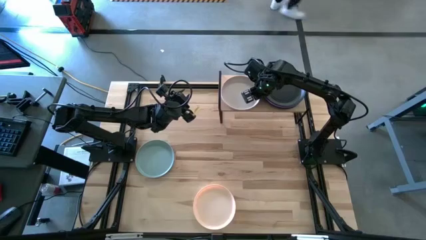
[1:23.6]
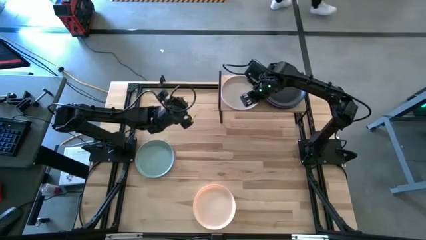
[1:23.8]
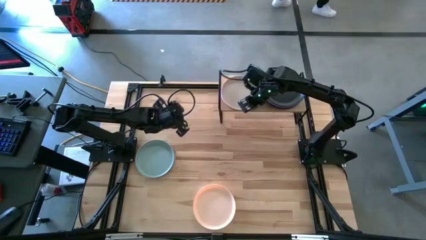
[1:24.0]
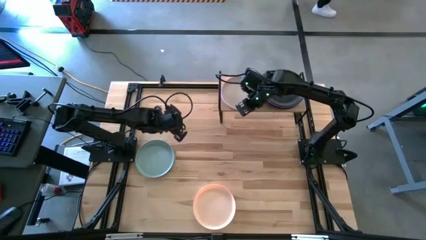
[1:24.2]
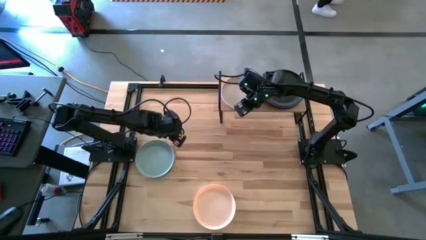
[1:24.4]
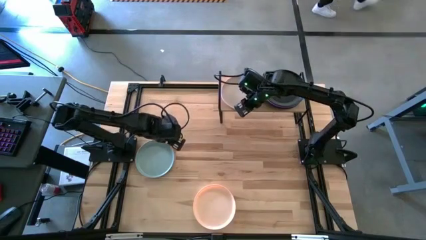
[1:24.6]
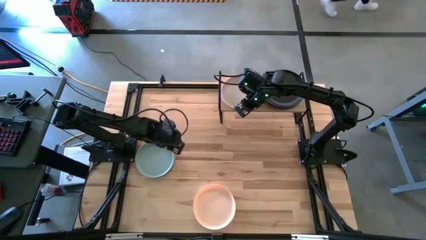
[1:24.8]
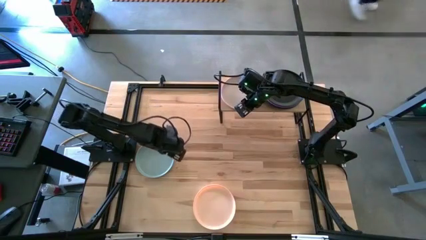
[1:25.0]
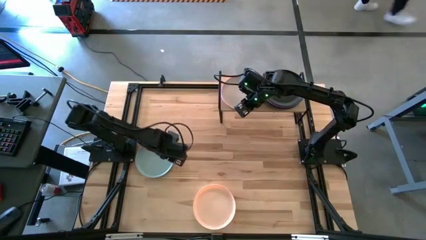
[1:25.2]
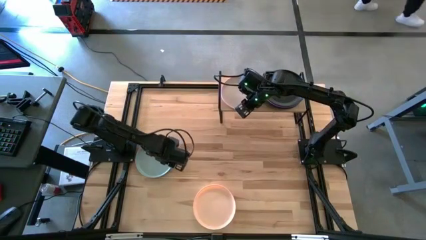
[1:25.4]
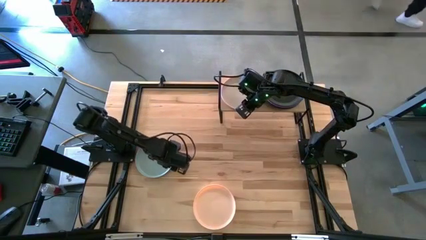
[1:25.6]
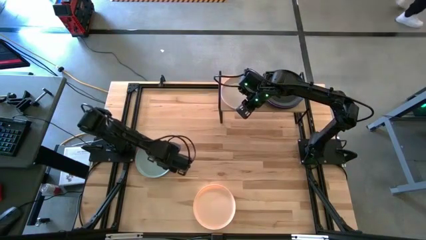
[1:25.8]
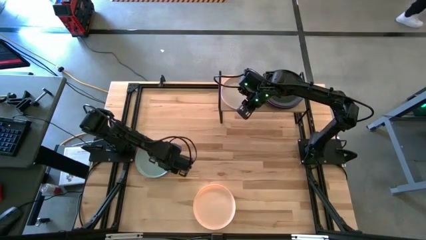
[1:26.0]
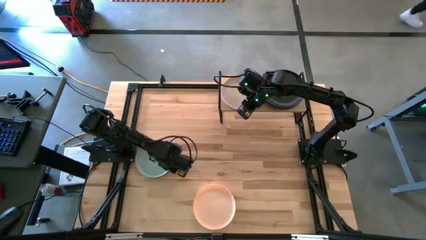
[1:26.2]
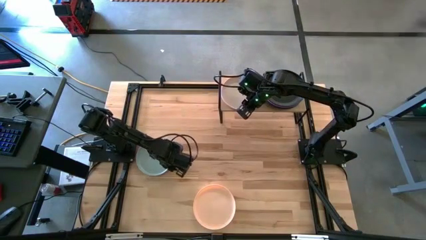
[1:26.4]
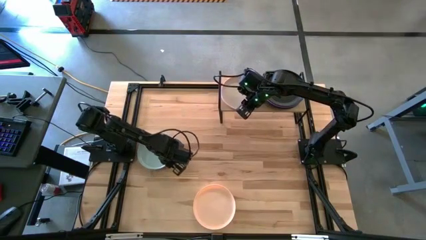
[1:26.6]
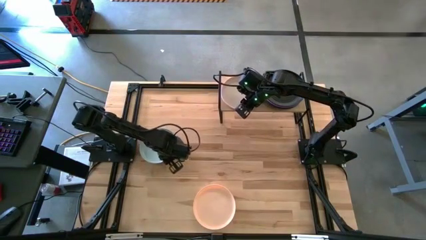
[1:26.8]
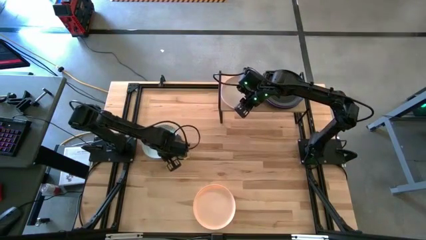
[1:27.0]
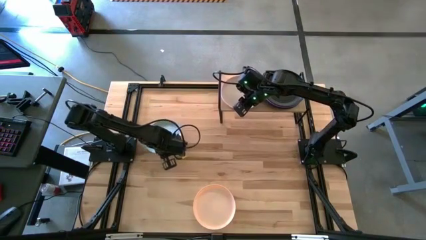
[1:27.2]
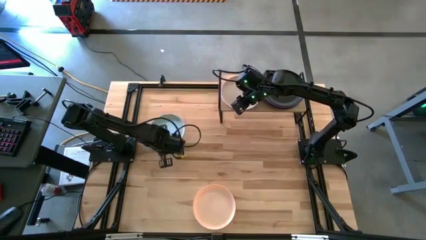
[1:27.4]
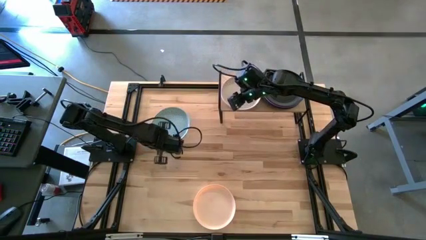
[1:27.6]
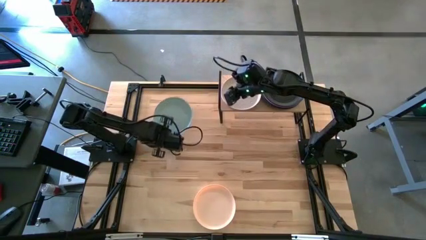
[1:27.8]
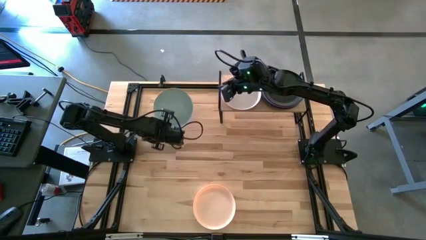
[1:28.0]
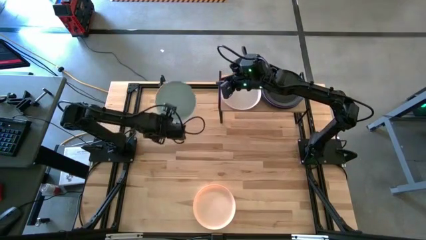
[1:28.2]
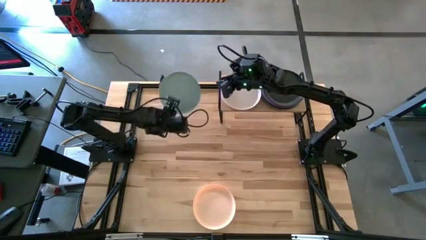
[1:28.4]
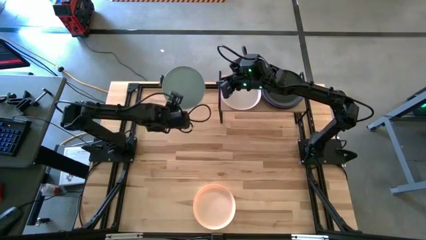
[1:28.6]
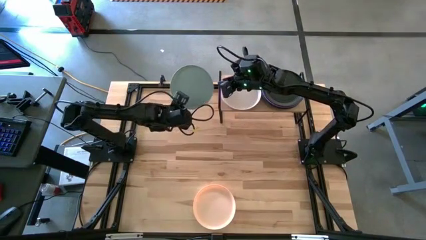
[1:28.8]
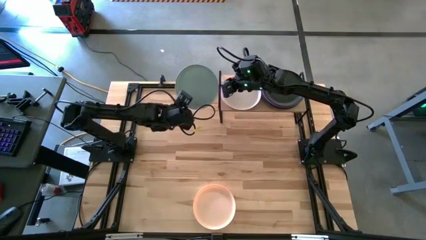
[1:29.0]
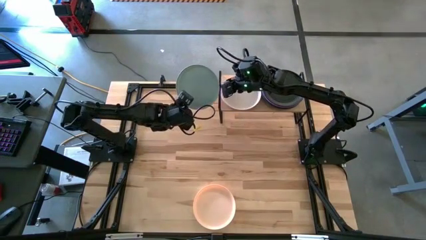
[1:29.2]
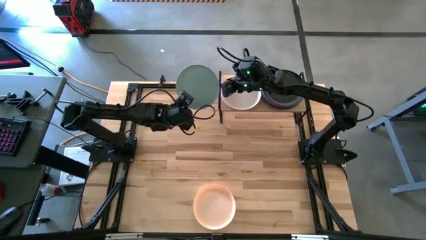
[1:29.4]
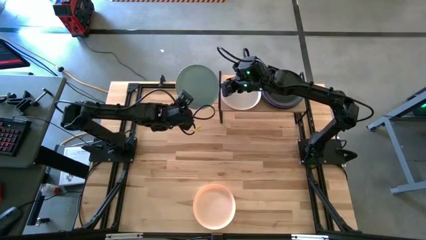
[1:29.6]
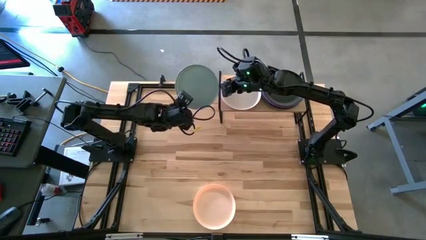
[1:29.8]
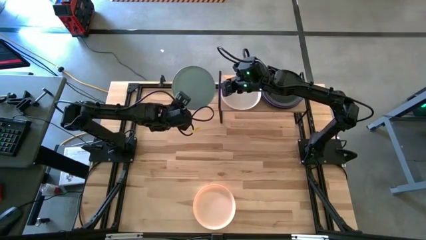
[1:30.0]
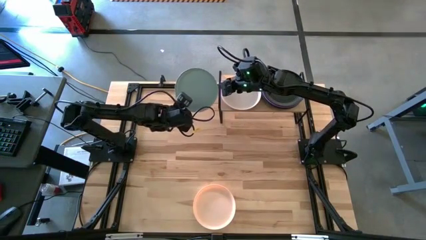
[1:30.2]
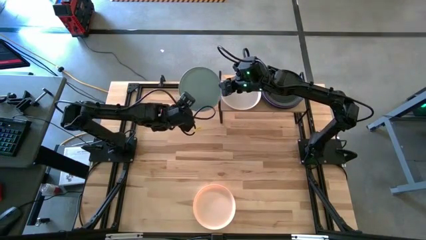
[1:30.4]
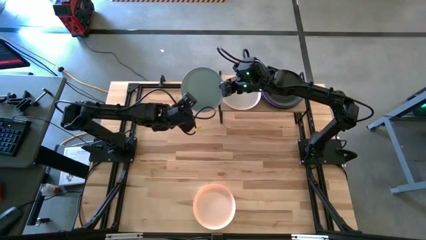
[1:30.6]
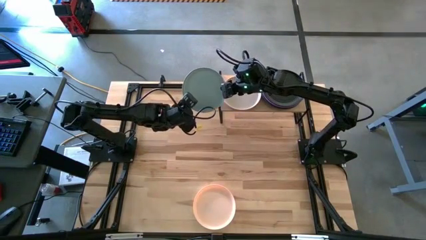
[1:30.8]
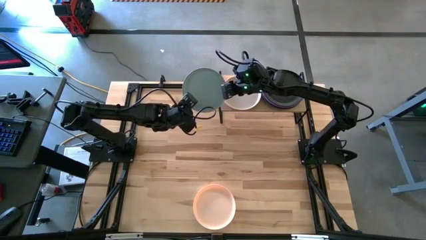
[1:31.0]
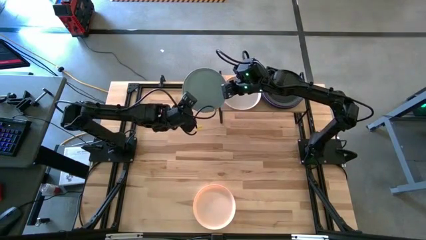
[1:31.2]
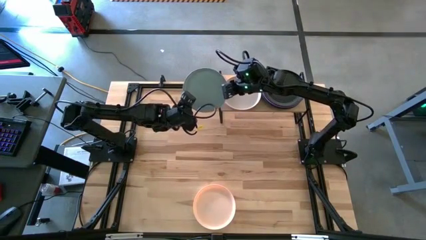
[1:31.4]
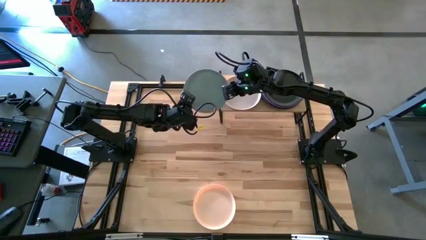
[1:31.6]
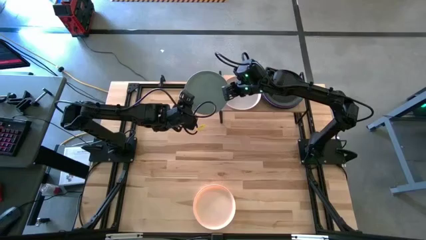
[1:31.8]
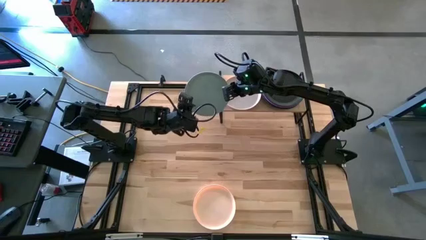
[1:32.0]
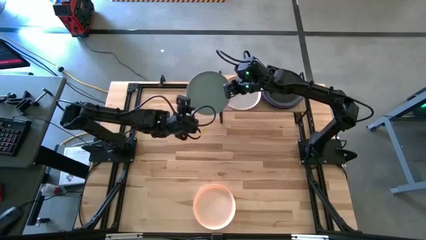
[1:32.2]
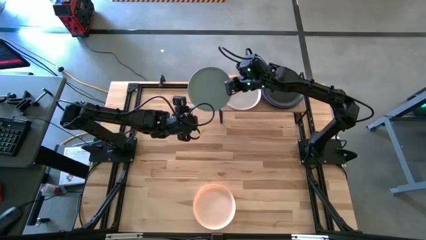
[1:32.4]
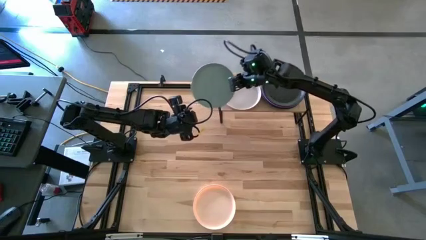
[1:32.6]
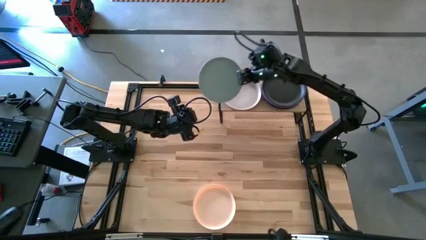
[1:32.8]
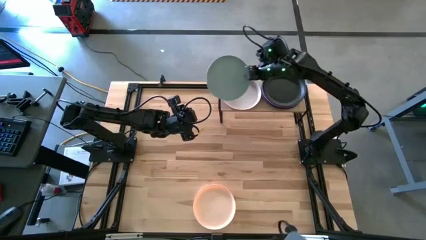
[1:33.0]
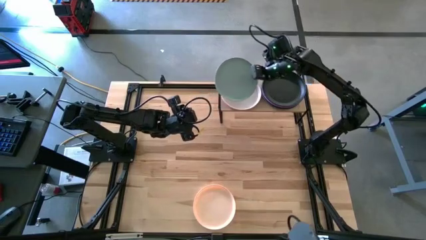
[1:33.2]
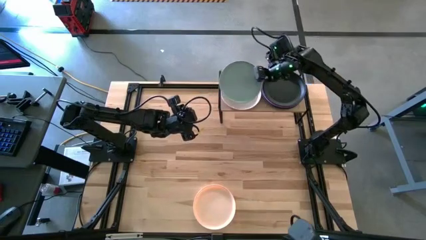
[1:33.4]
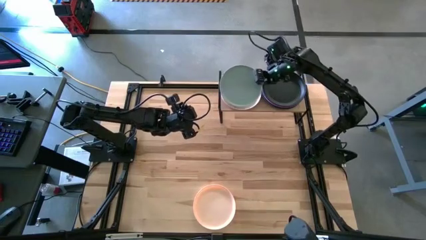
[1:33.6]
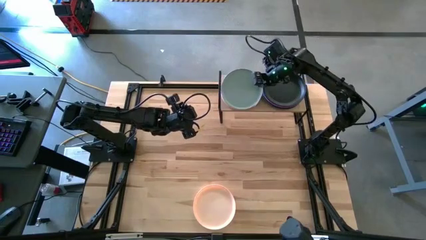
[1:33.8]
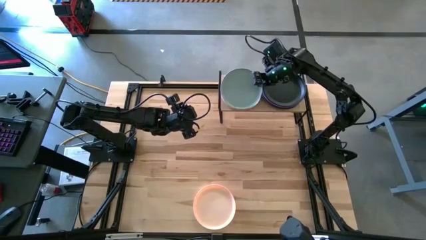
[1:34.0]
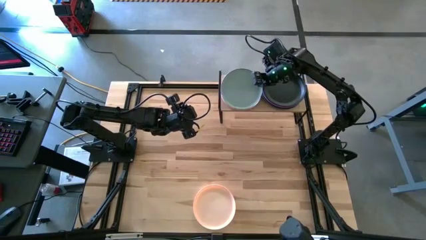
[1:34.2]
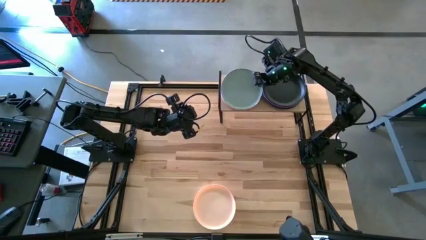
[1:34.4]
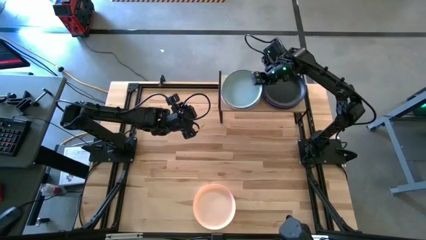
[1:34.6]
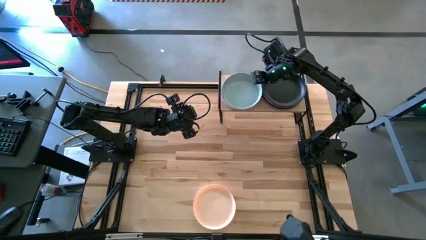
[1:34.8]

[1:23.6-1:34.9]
Task: Place and stack plates onto a shelf
Stack the blue plate on top of the white plate on the shelf

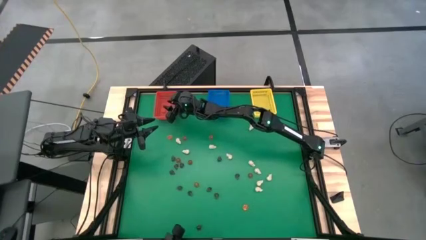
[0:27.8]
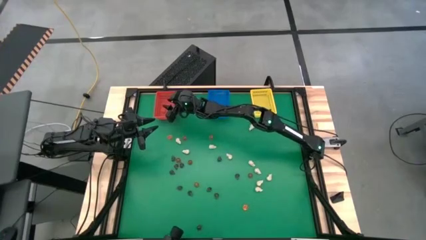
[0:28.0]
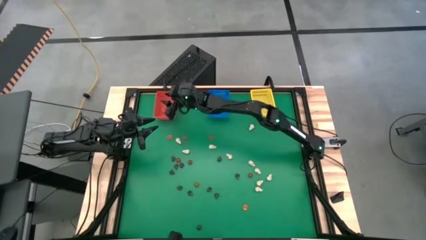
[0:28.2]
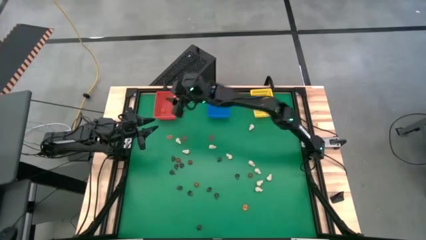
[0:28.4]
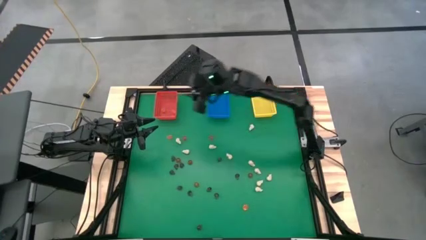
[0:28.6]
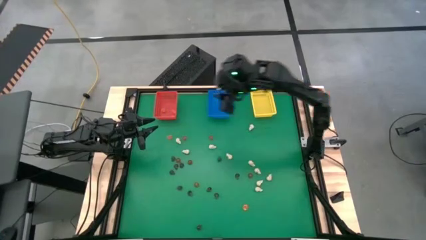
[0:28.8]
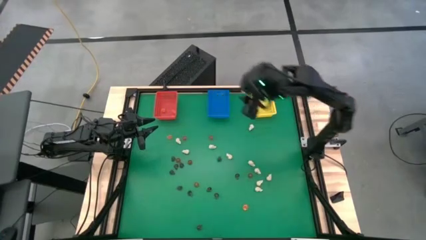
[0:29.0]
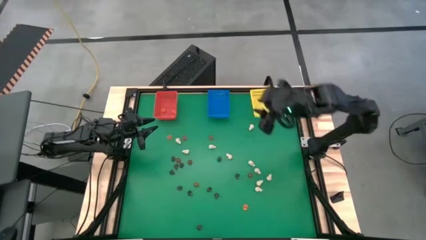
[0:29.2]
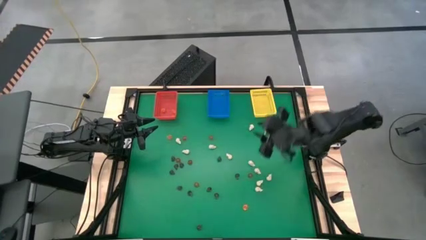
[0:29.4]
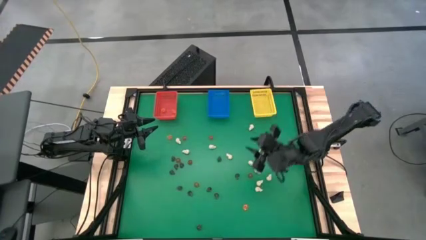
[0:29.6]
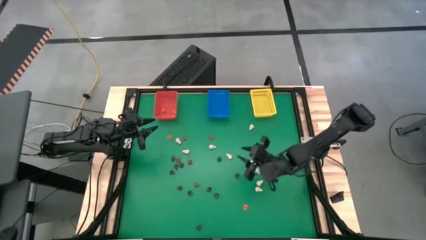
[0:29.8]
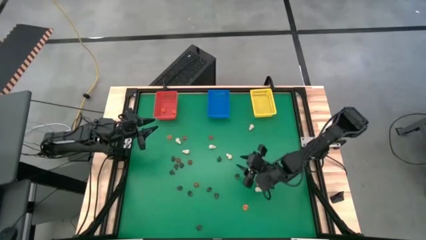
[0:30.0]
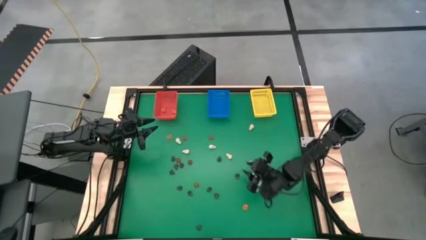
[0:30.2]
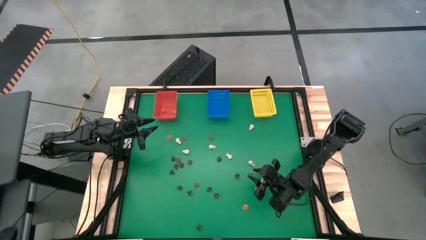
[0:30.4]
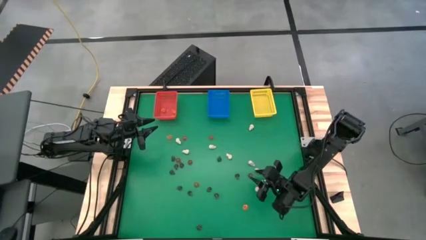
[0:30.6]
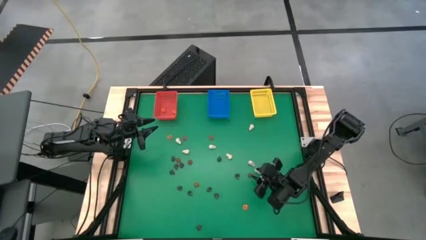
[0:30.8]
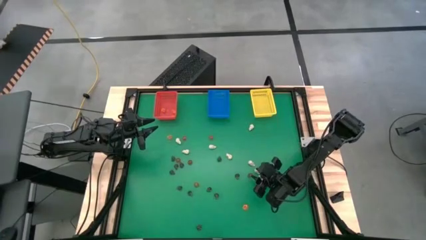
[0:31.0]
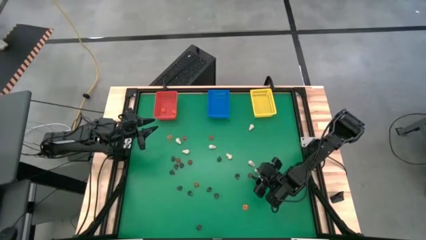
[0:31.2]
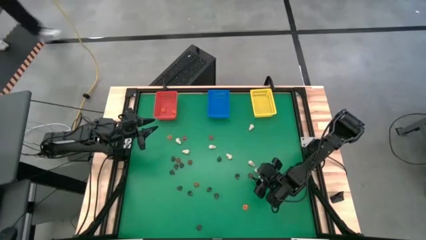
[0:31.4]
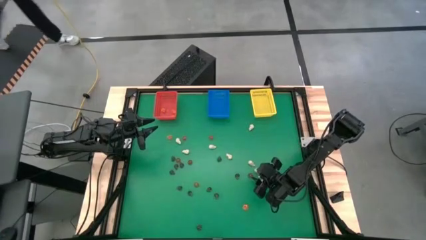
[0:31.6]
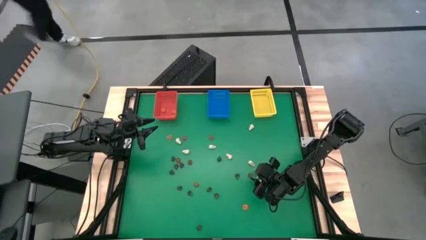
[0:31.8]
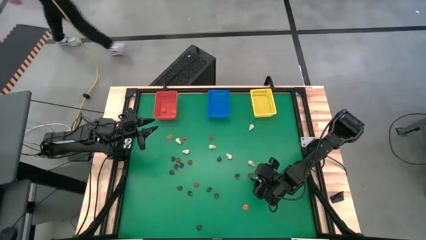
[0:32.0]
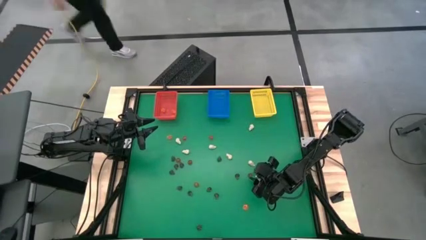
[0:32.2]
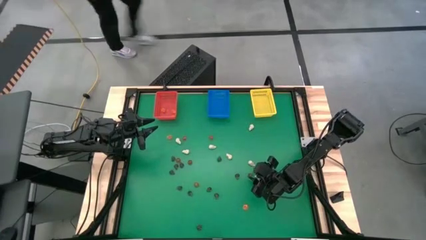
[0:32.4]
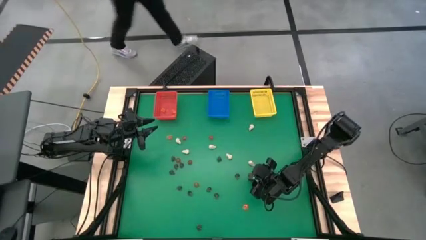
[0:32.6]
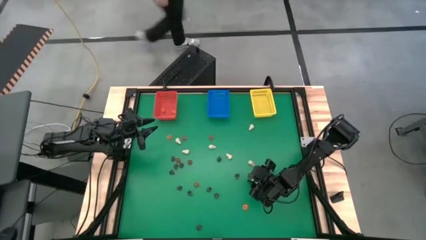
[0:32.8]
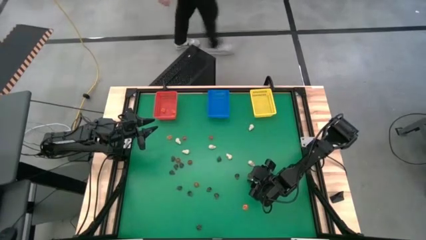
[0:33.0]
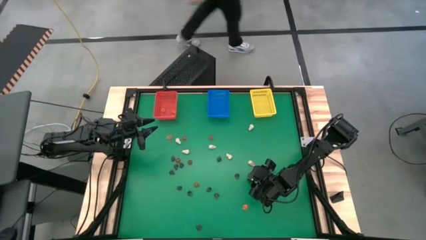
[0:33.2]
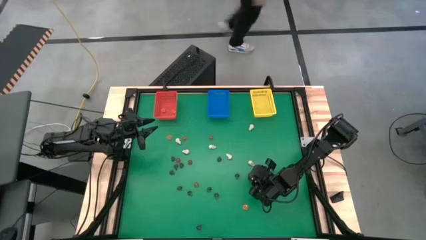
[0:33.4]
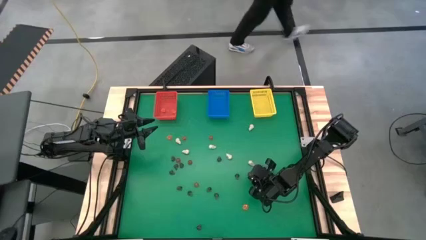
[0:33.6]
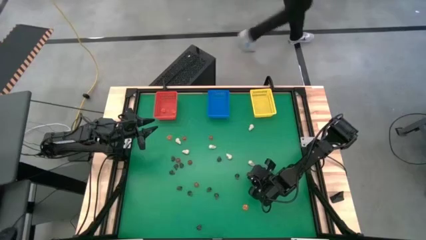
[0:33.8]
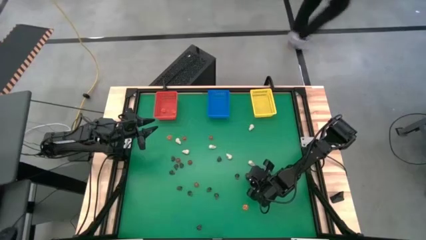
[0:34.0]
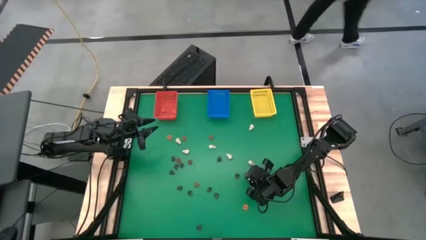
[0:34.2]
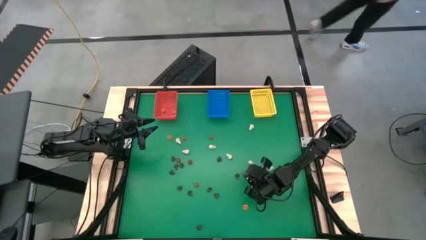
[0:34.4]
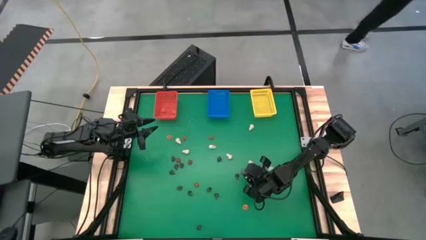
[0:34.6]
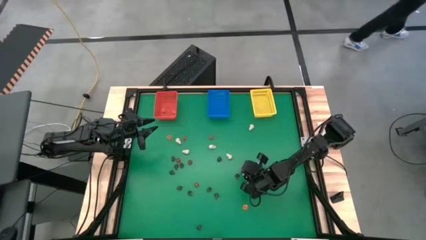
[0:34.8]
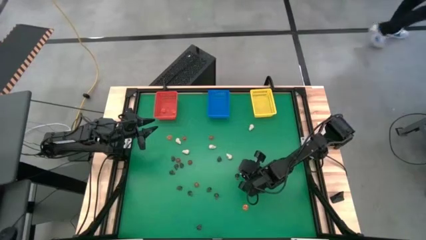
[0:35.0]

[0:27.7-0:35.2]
Task: Sort Halloween decoration
Put the orange pumpkin toy into the red bin
